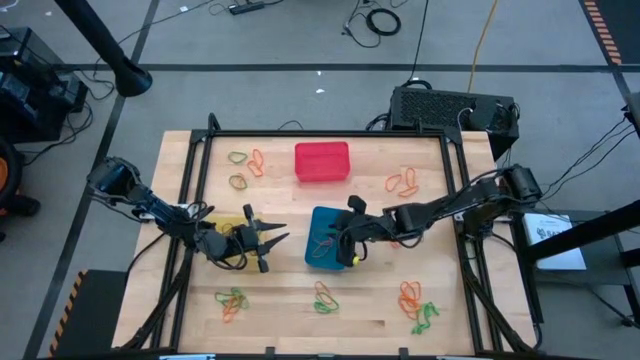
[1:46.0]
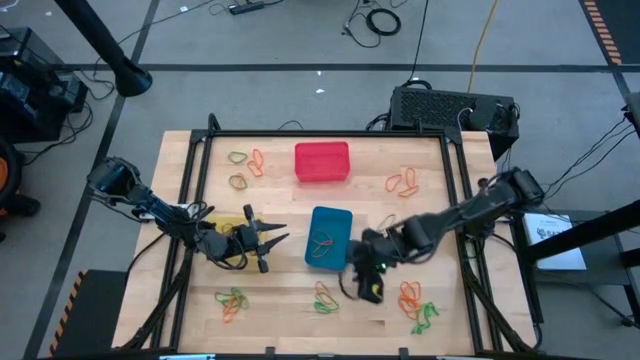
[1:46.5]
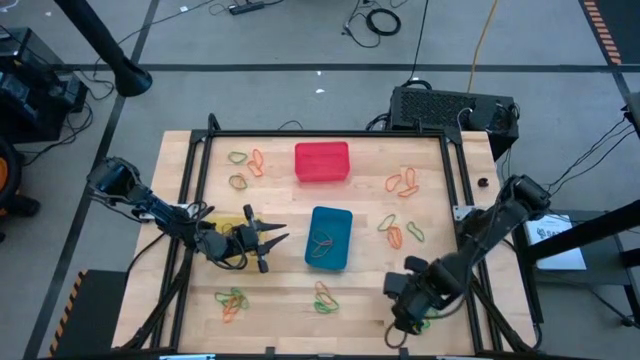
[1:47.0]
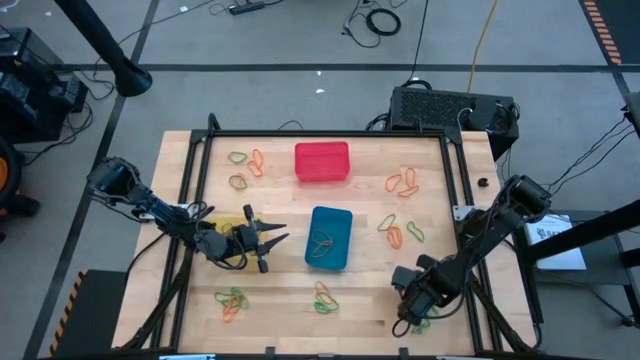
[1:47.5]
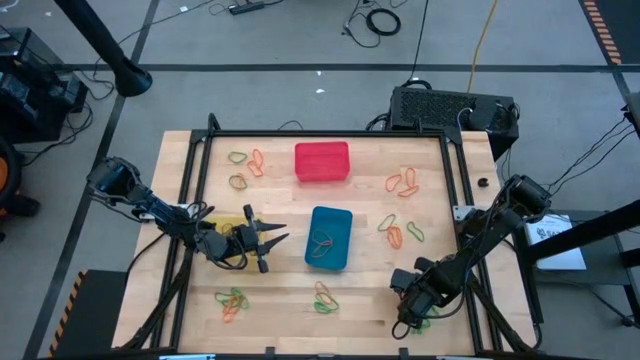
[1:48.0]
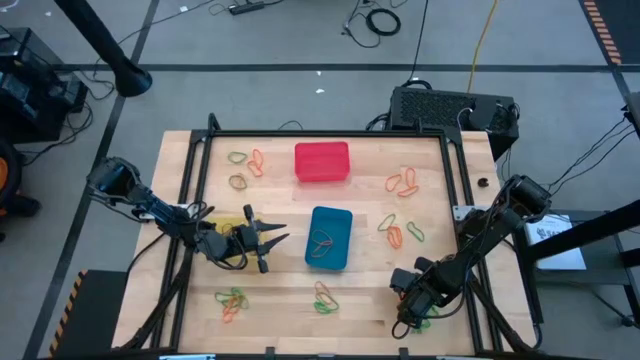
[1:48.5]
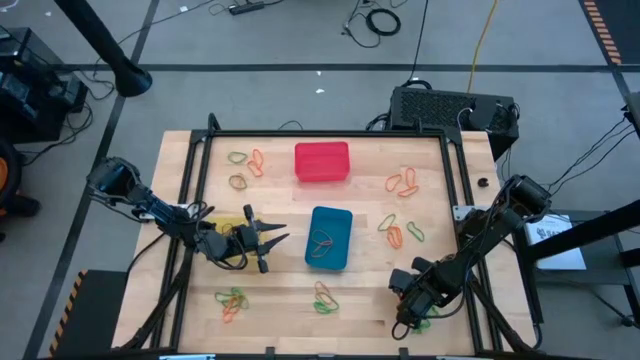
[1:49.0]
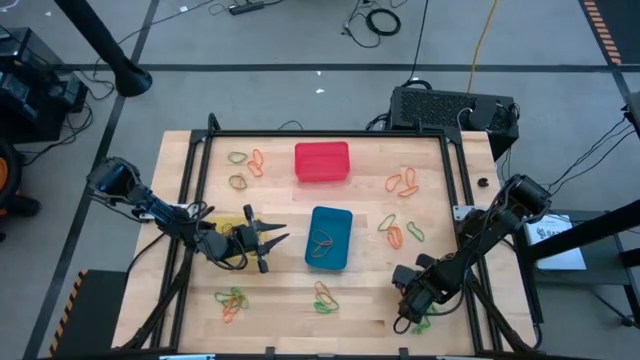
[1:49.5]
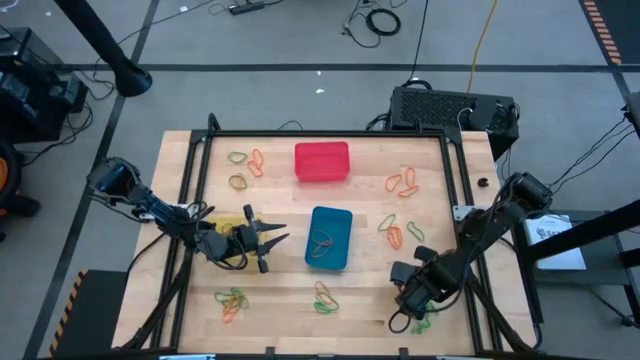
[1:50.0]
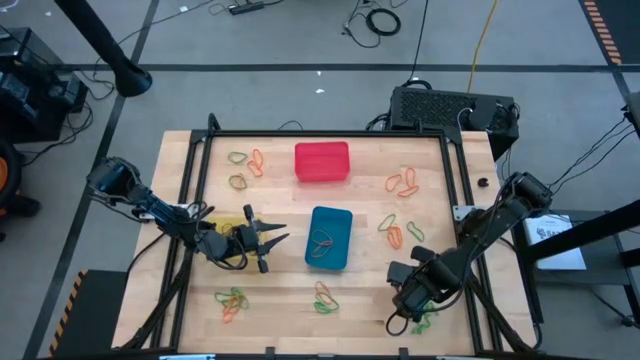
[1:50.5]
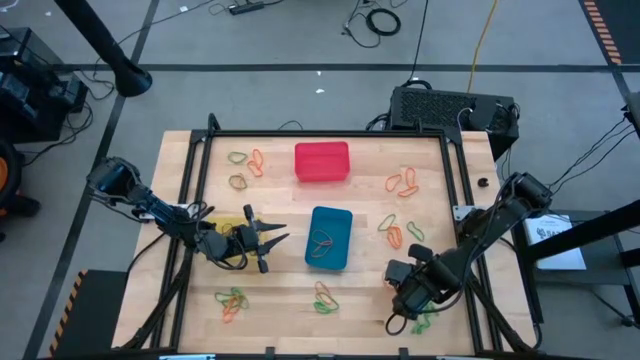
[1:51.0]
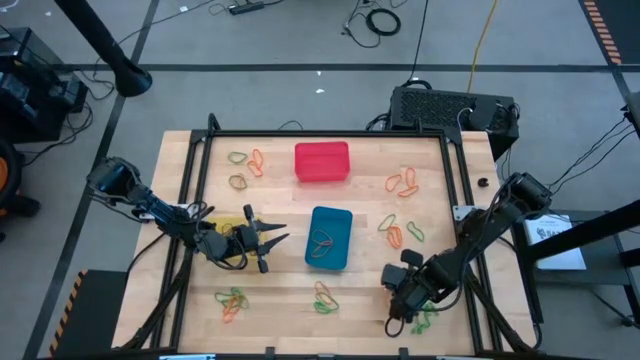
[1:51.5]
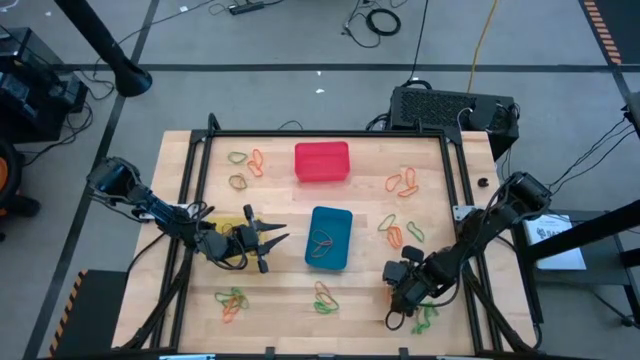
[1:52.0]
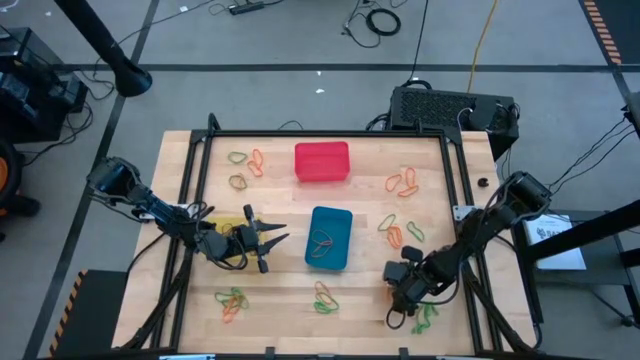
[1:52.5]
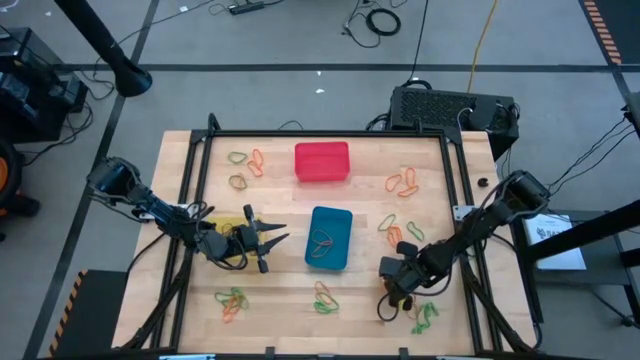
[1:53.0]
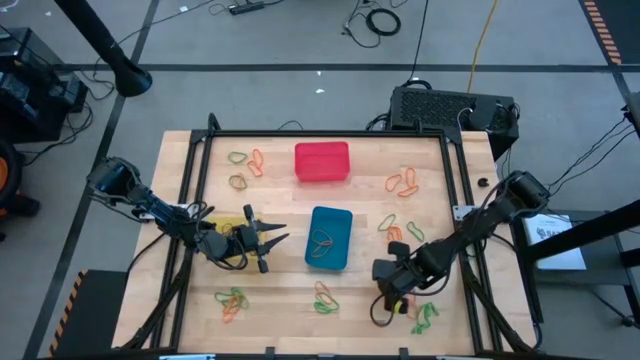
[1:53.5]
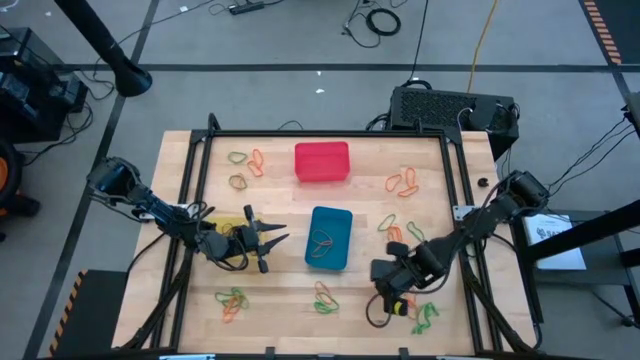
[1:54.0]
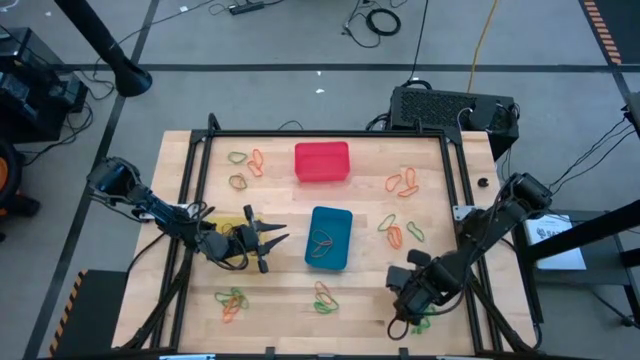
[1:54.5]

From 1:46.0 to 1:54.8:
Task: Sort rubber bands into baskets
Put the orange rubber band into the blue bin

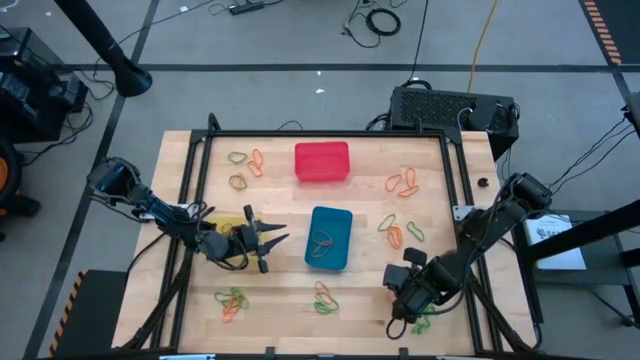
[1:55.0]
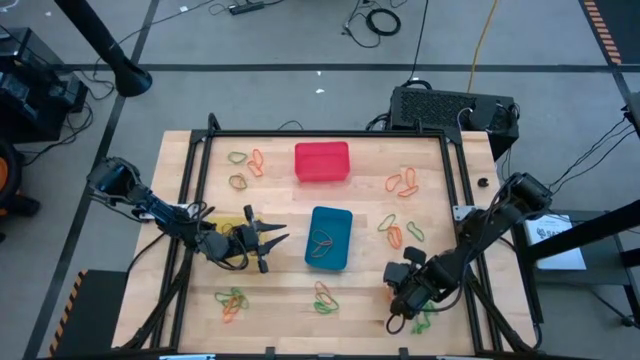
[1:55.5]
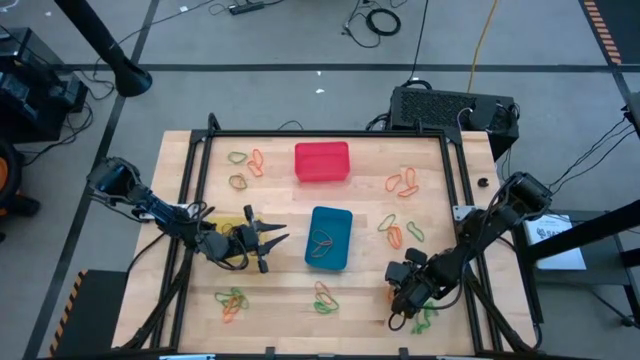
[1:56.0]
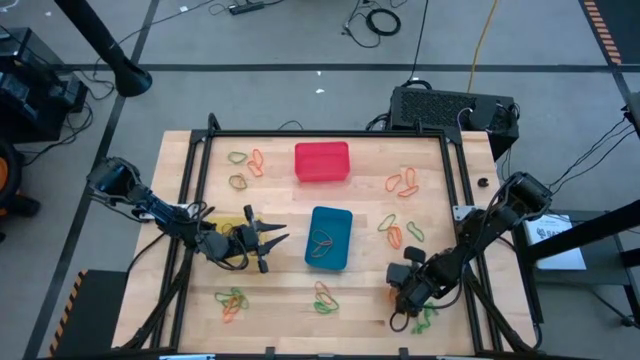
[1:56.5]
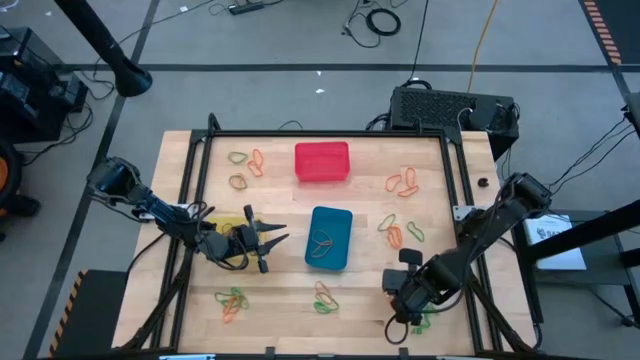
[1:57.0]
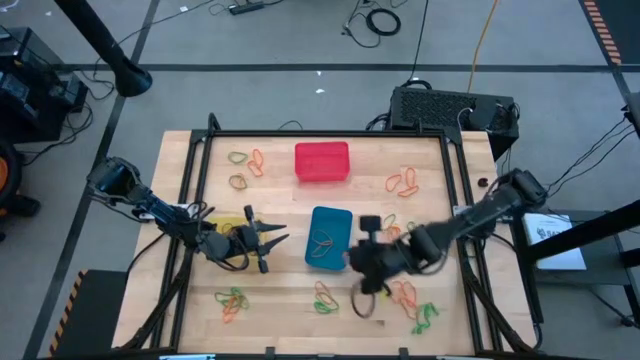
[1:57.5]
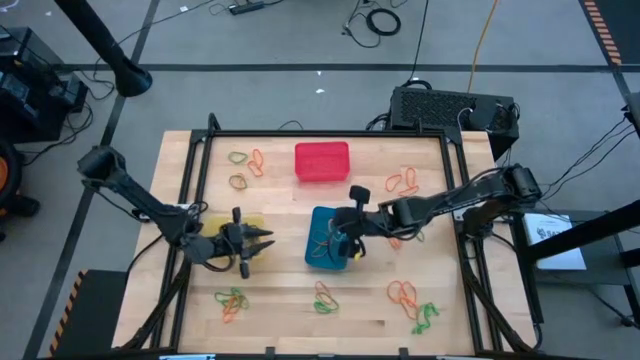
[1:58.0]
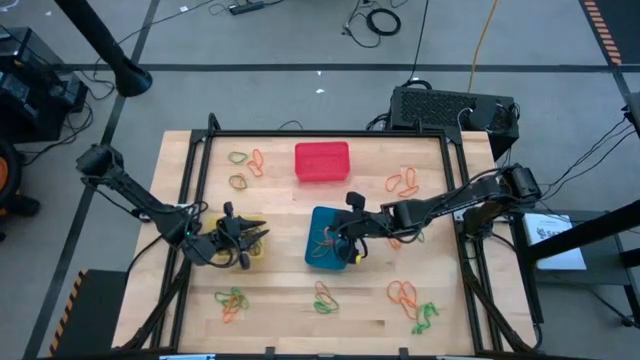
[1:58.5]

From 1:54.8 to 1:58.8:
Put the orange rubber band into the blue bin

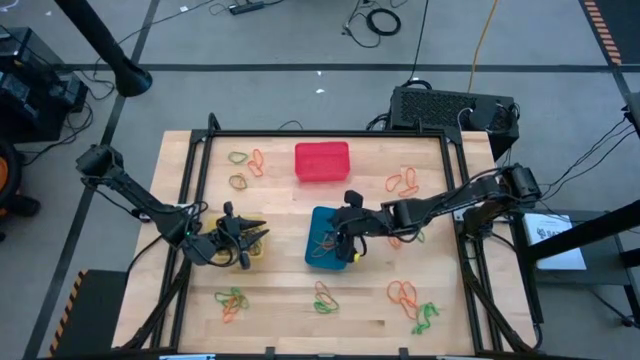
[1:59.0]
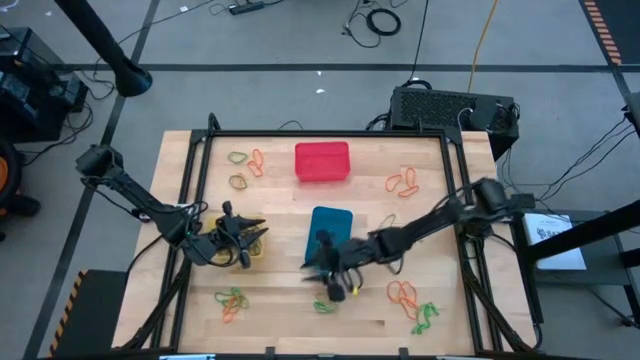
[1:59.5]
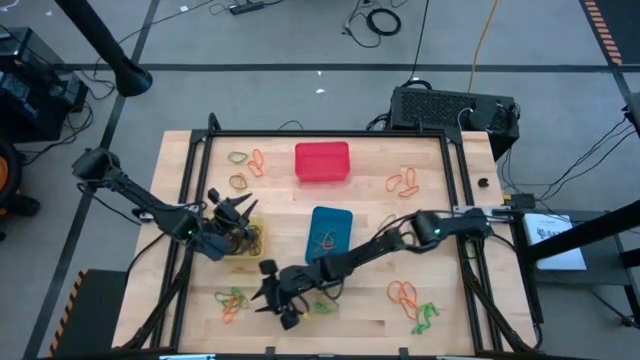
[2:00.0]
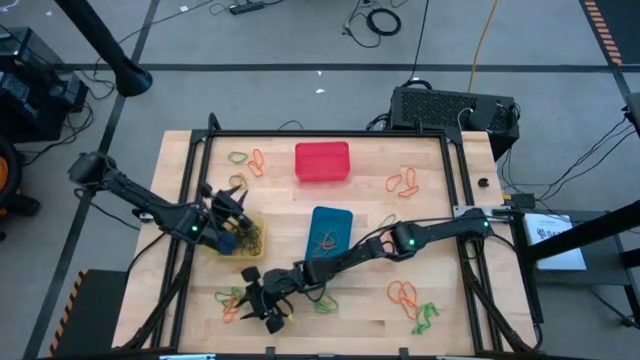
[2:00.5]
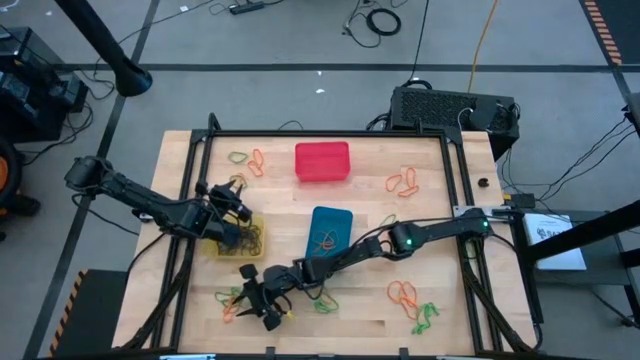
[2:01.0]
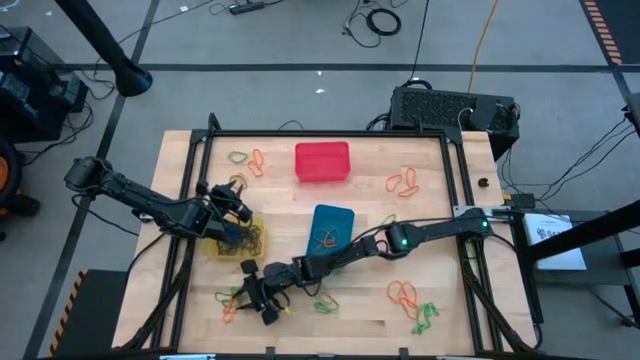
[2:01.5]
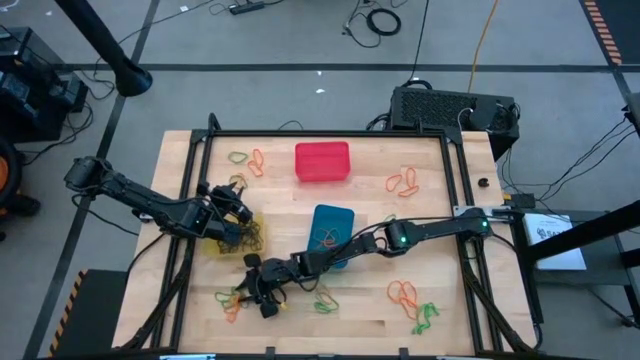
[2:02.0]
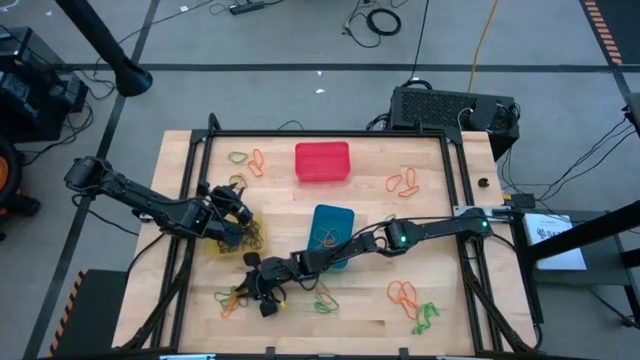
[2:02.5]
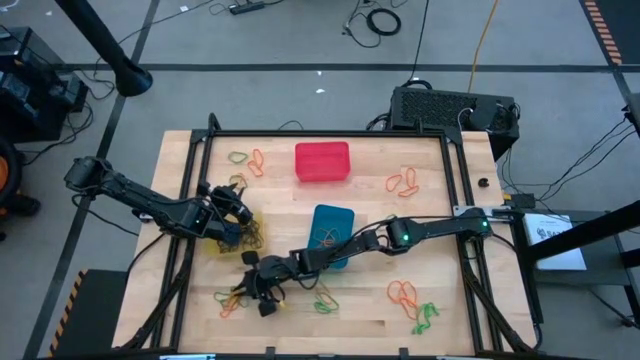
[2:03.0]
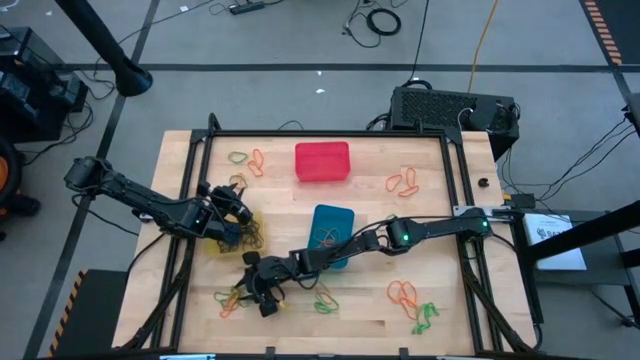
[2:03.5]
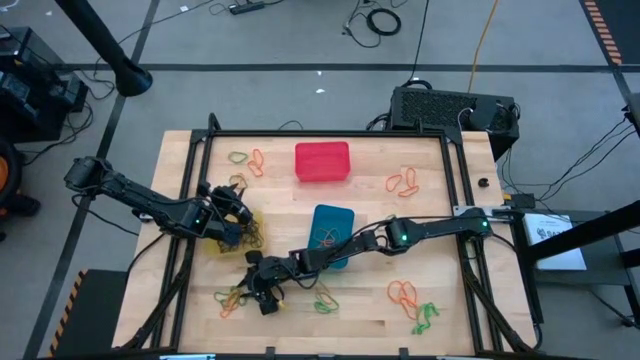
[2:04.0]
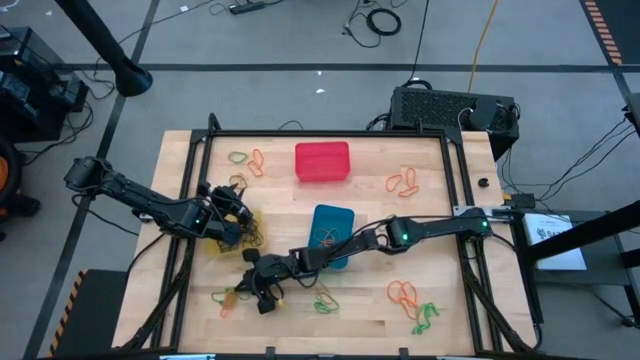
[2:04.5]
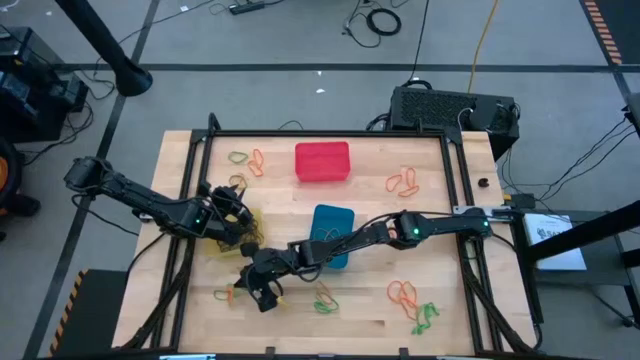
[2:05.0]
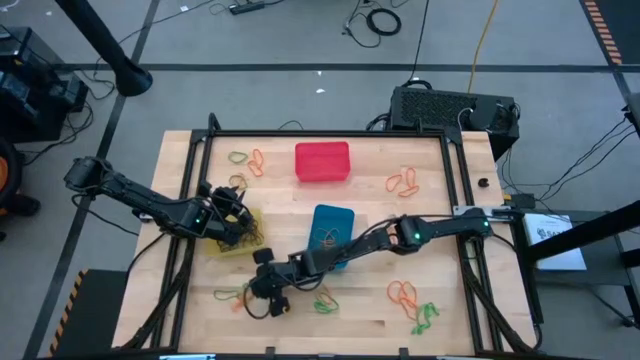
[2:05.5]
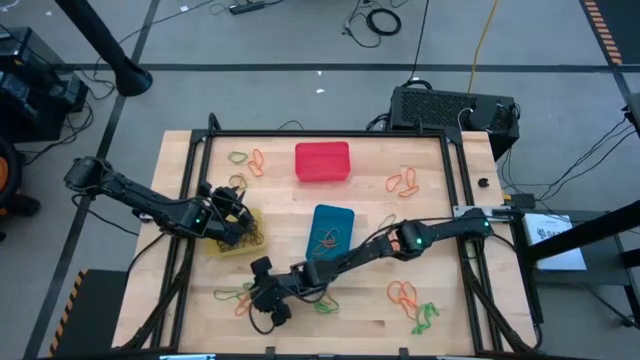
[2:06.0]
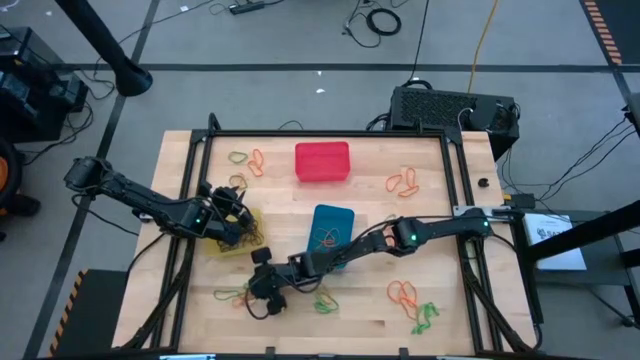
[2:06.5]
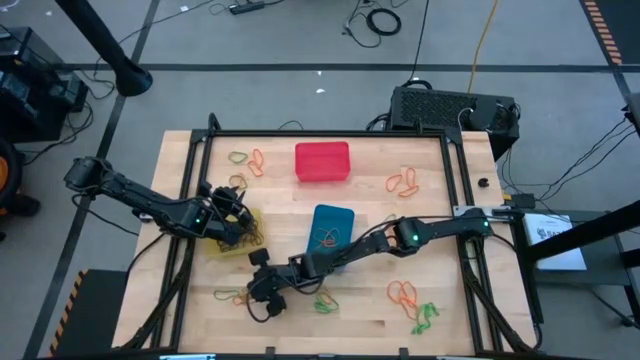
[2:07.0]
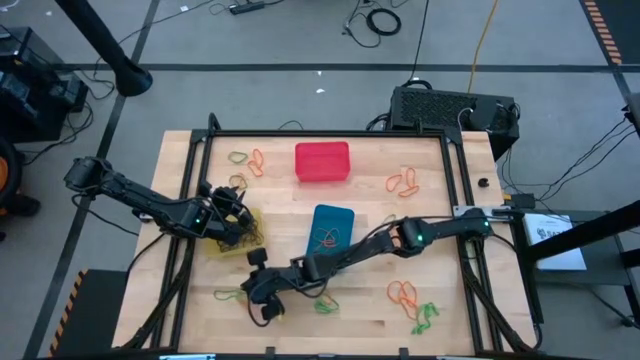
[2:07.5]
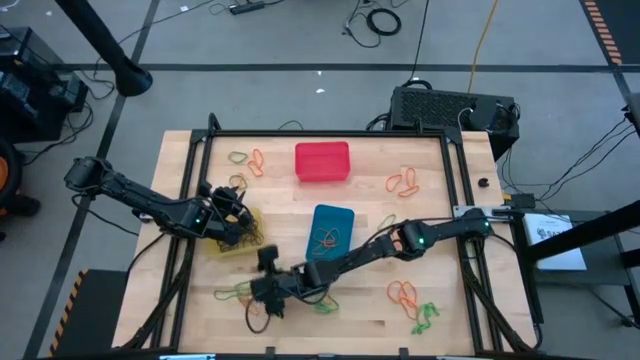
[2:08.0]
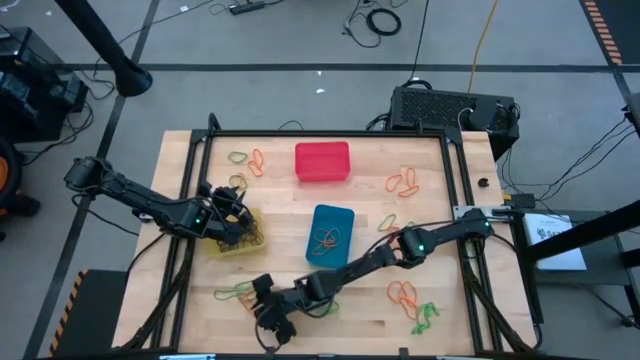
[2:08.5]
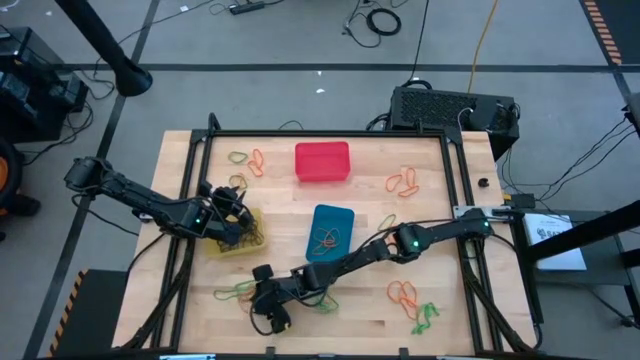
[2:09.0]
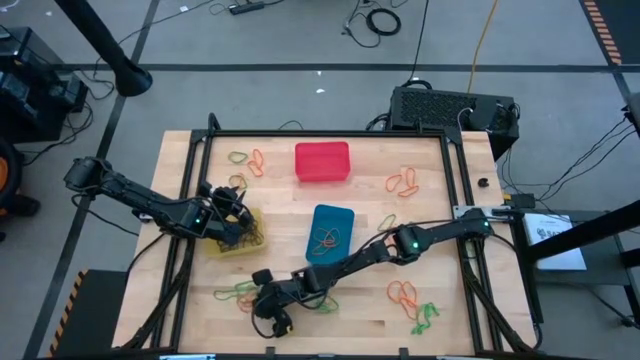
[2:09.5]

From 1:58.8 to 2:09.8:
Put the orange rubber band into the blue bin
